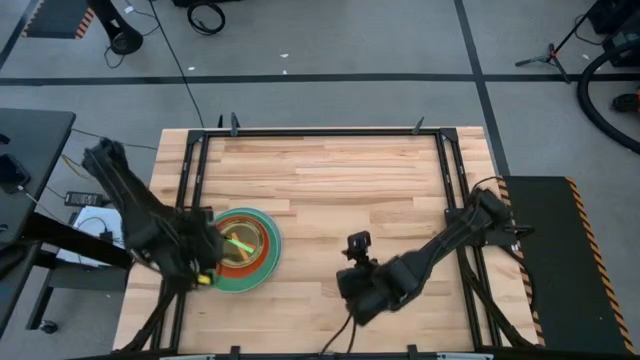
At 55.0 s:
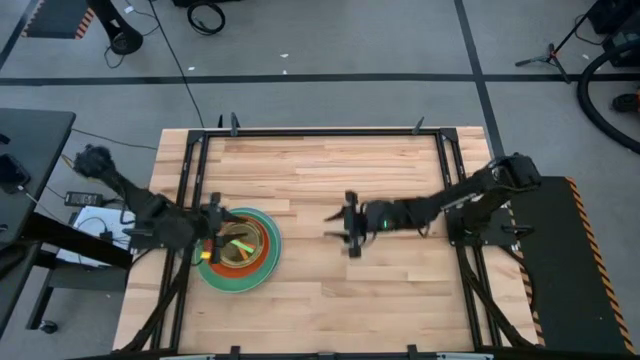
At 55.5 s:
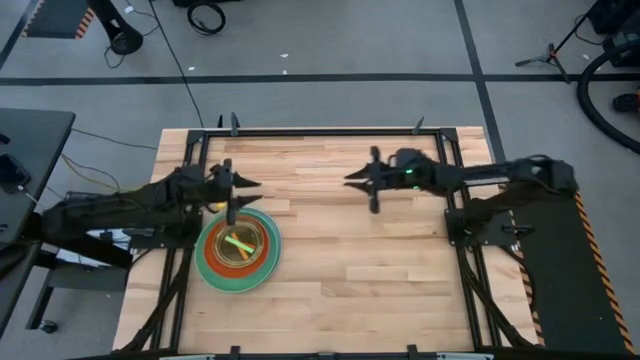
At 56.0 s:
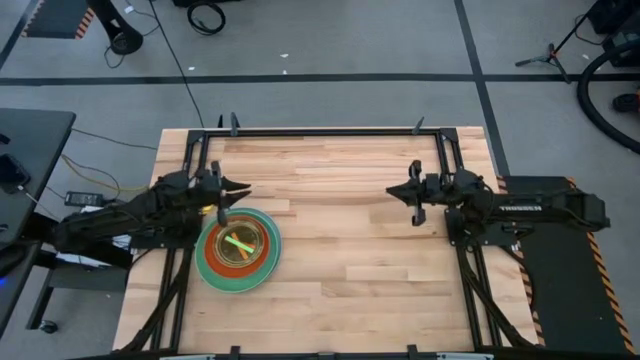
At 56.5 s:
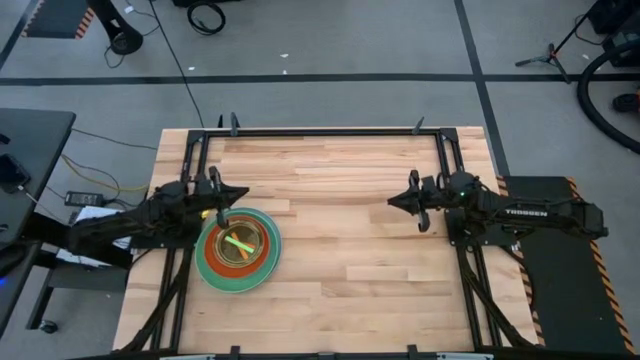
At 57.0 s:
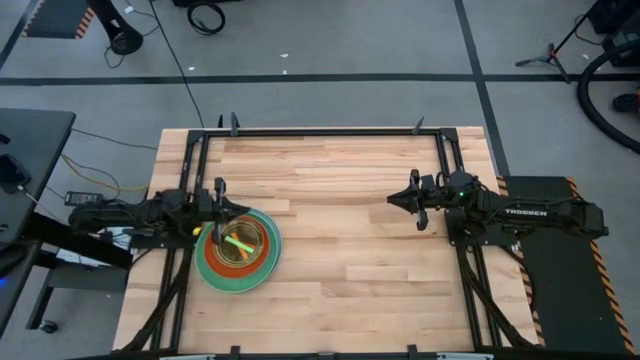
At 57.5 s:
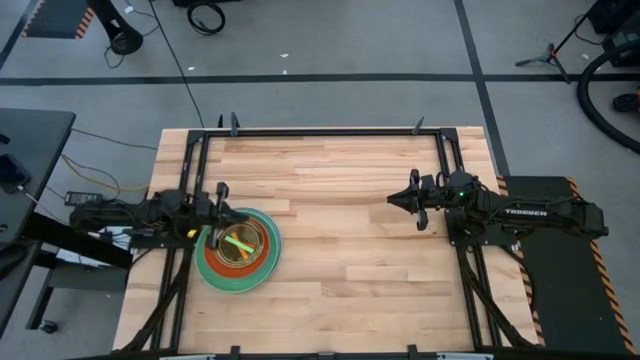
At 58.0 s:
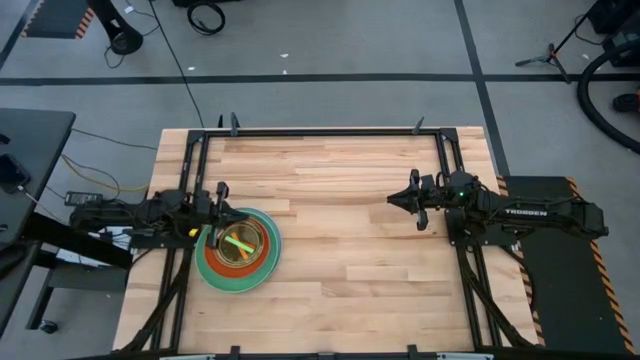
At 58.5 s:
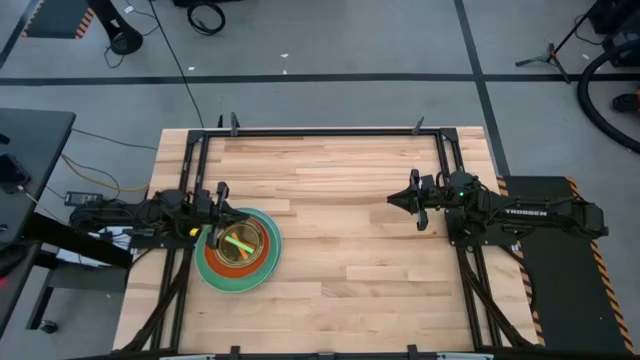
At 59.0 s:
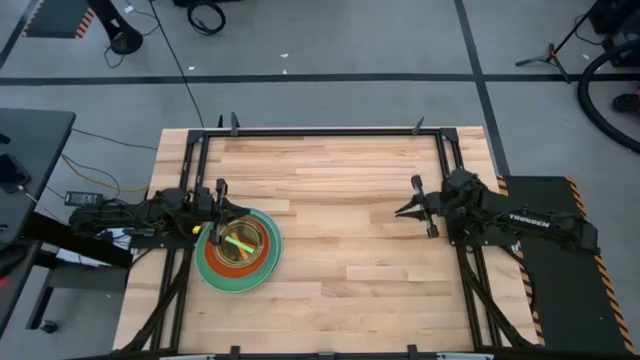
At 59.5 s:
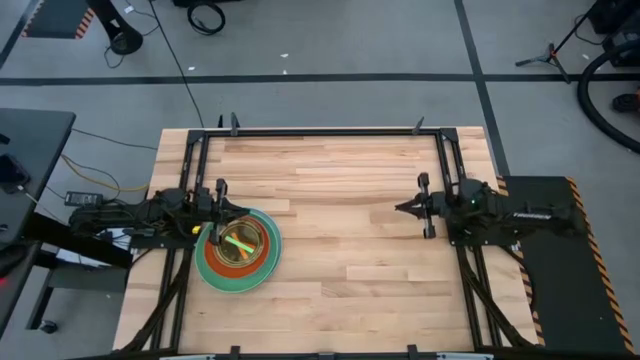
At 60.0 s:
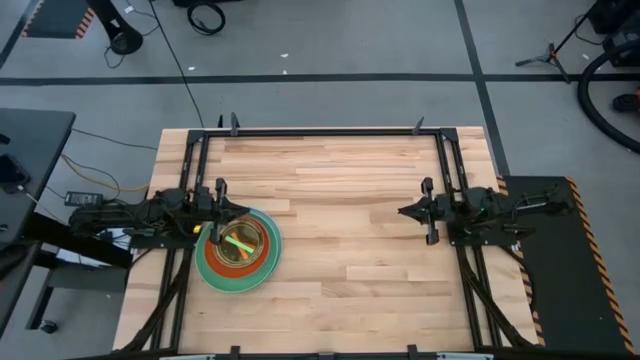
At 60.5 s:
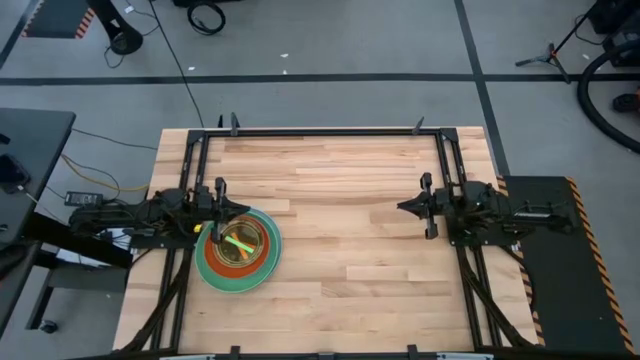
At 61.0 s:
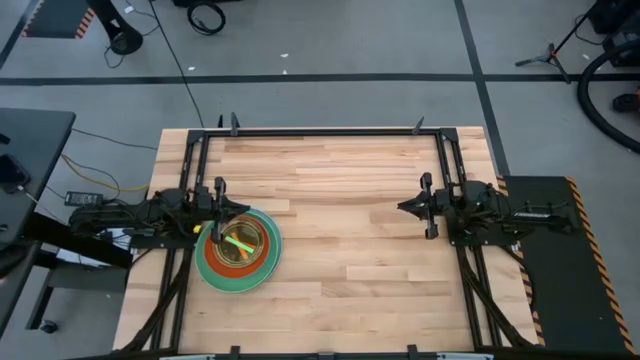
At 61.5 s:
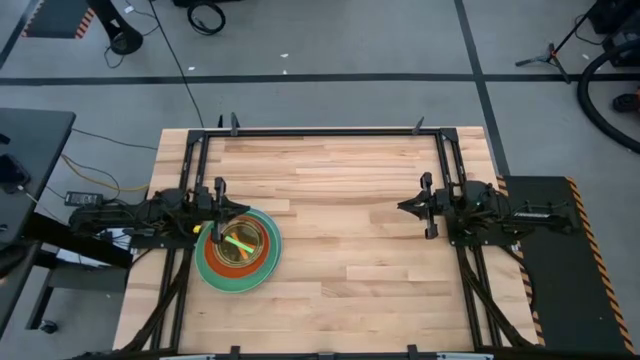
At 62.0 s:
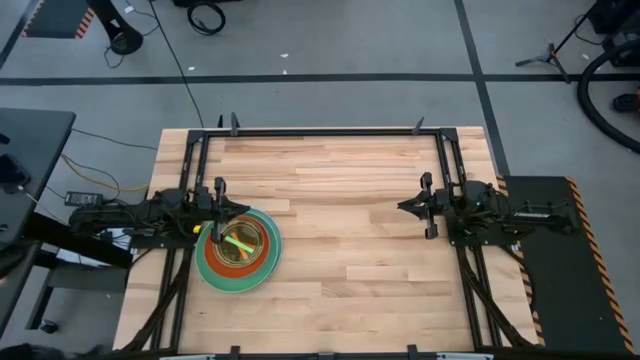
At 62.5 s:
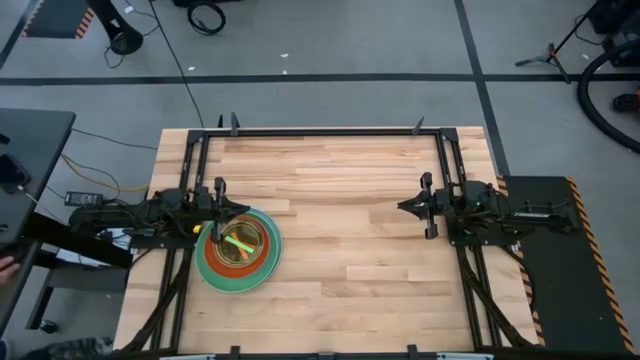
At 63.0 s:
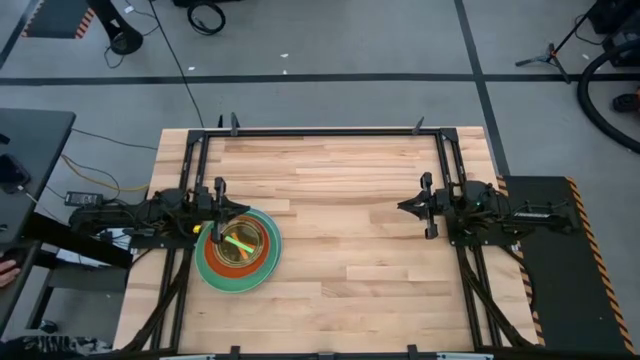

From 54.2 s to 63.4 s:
Task: Stack plastic plates
Return to Home Position

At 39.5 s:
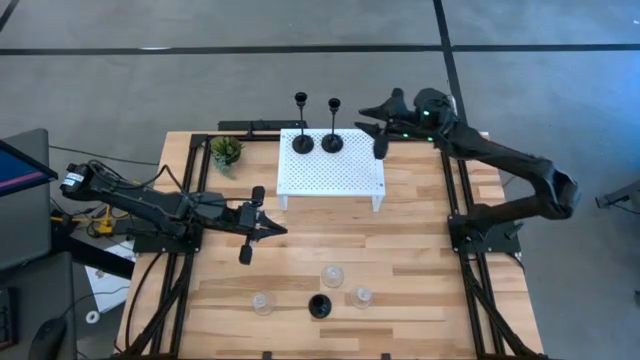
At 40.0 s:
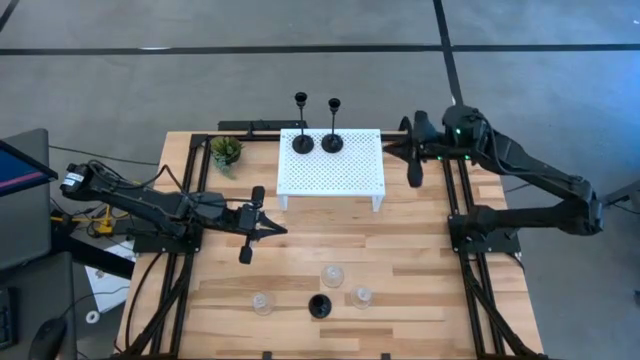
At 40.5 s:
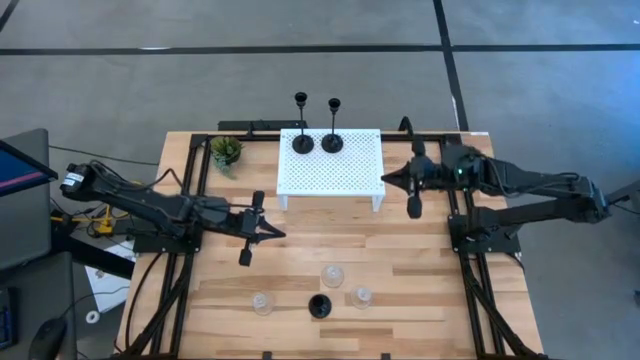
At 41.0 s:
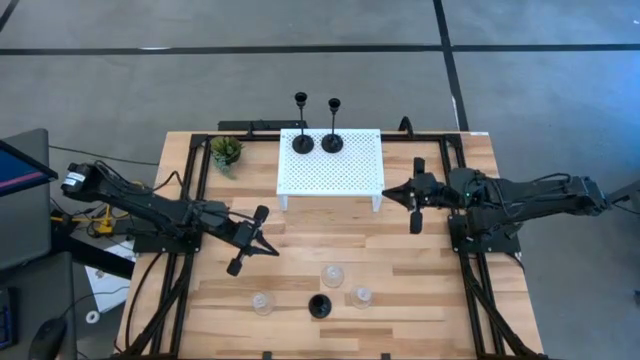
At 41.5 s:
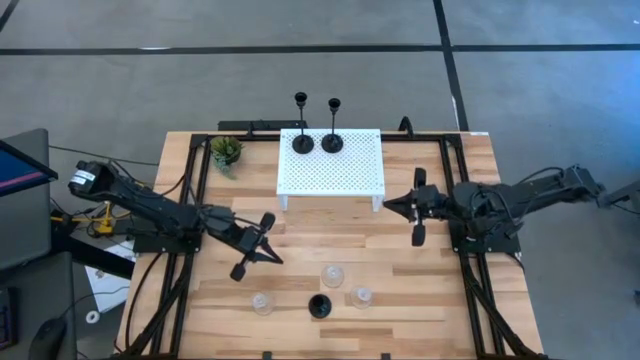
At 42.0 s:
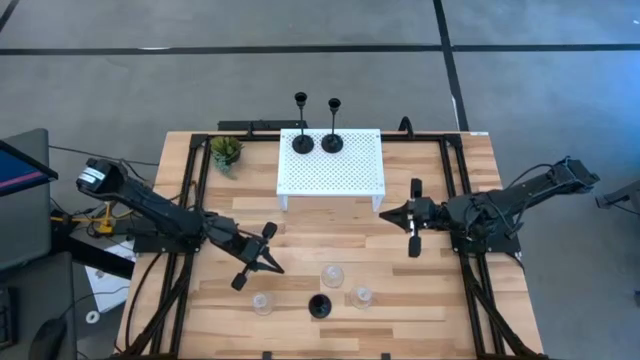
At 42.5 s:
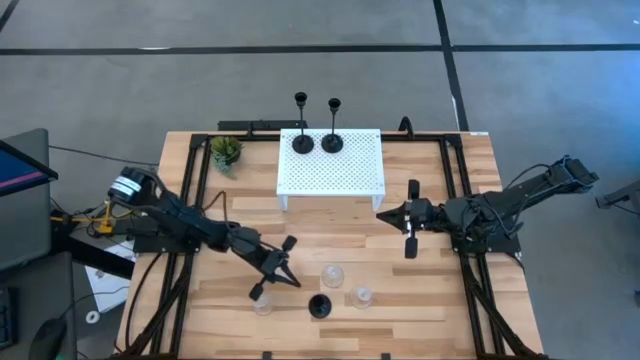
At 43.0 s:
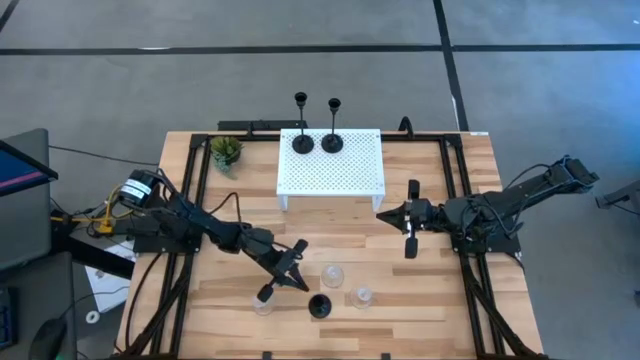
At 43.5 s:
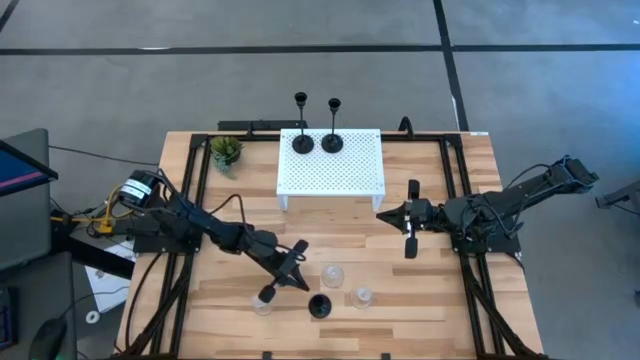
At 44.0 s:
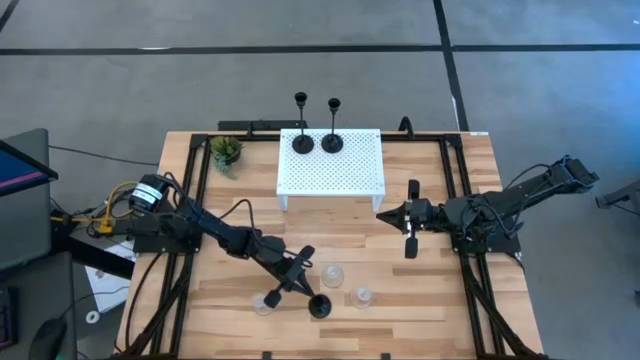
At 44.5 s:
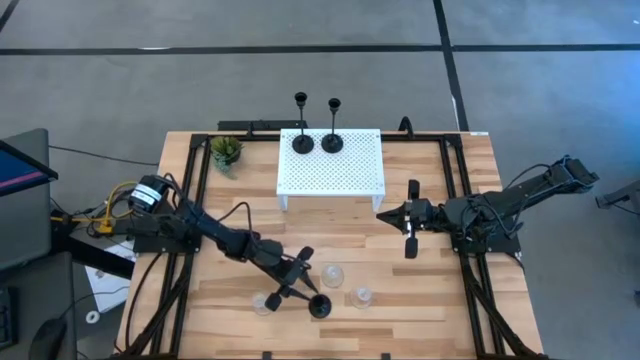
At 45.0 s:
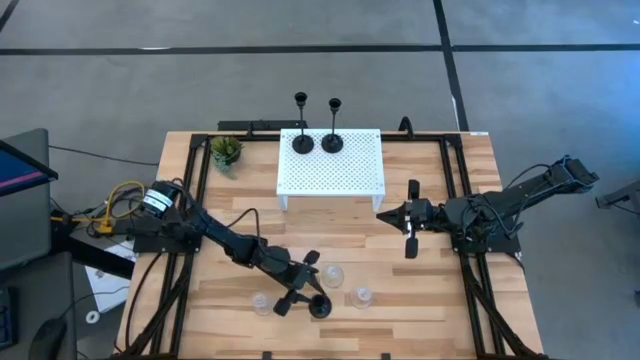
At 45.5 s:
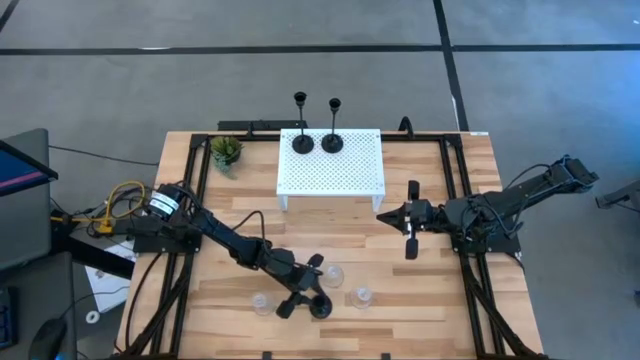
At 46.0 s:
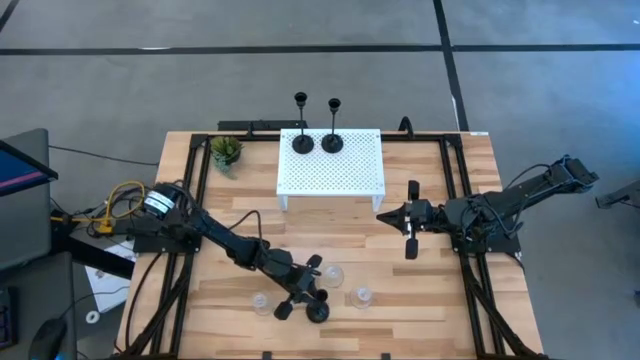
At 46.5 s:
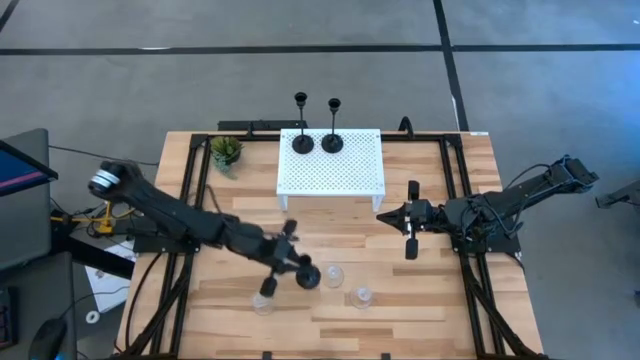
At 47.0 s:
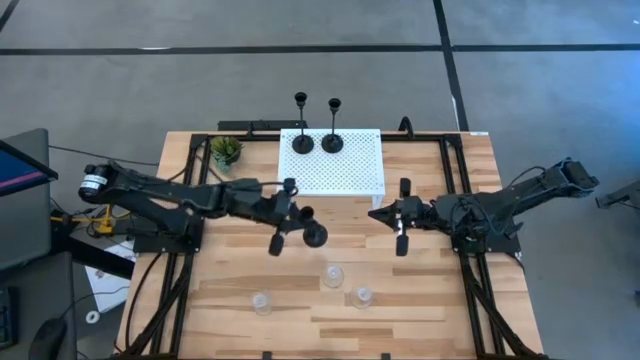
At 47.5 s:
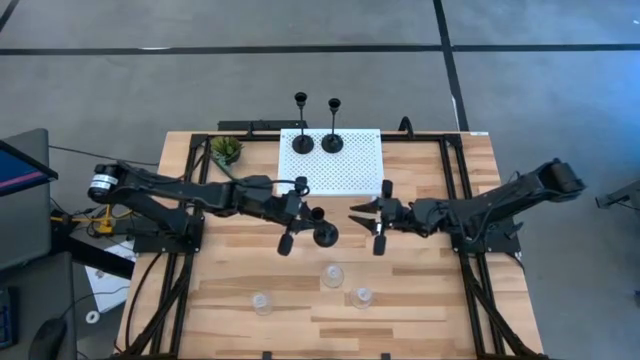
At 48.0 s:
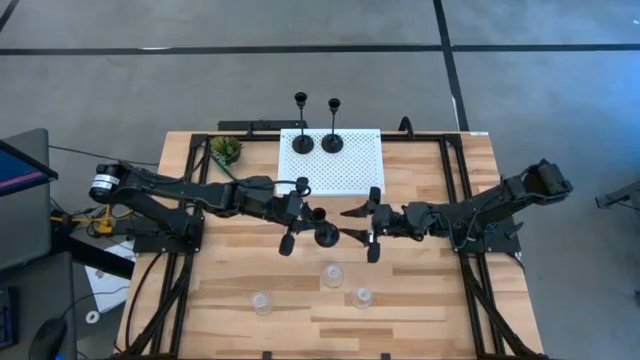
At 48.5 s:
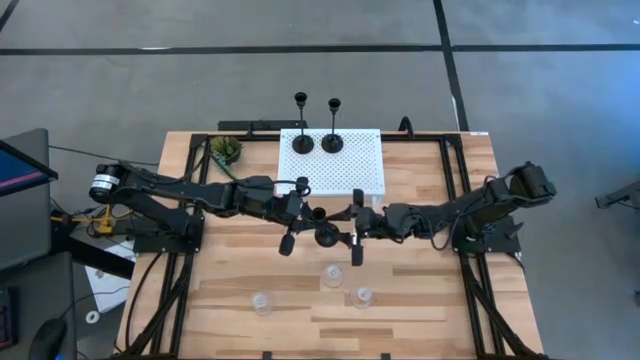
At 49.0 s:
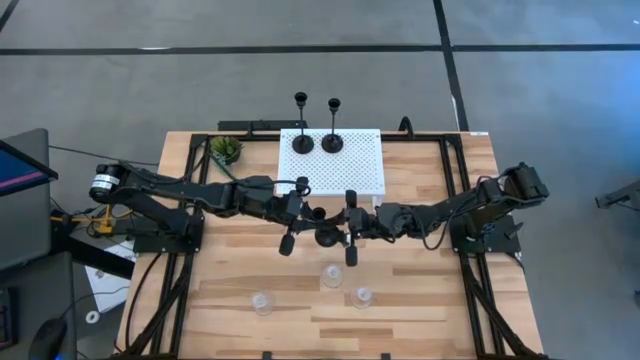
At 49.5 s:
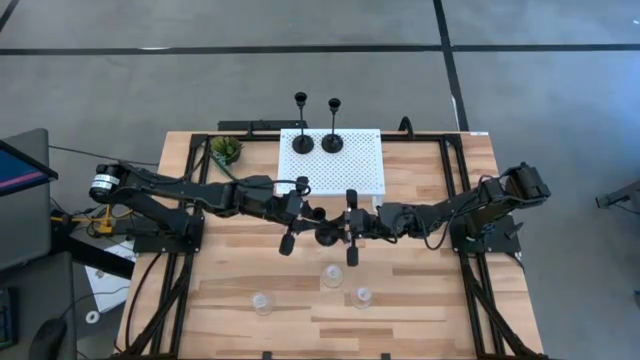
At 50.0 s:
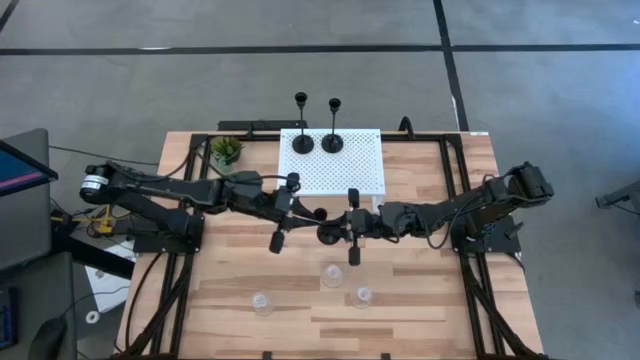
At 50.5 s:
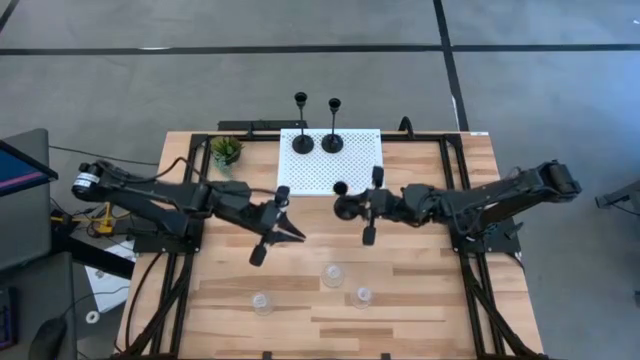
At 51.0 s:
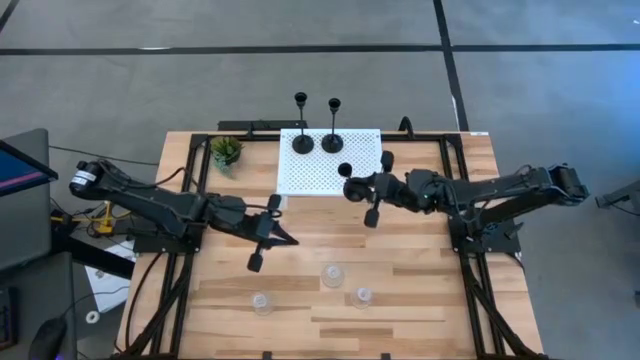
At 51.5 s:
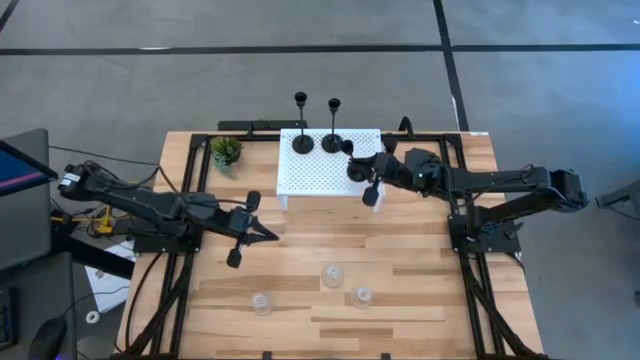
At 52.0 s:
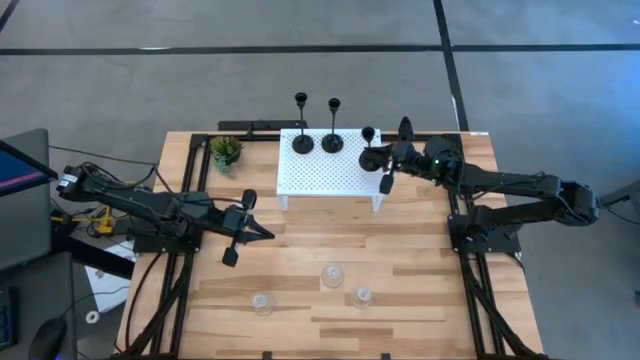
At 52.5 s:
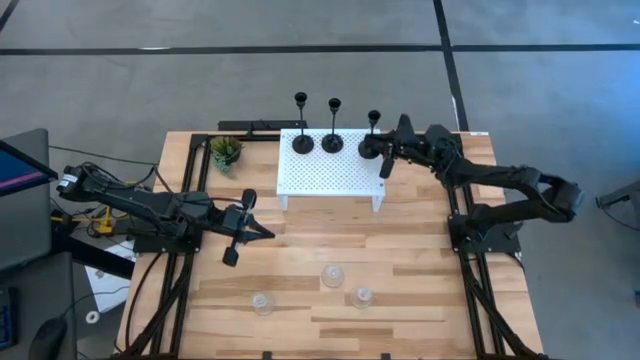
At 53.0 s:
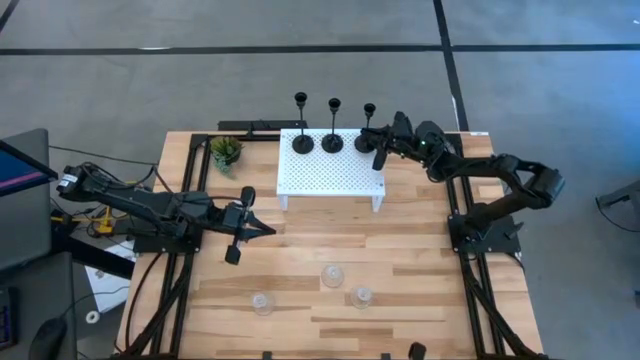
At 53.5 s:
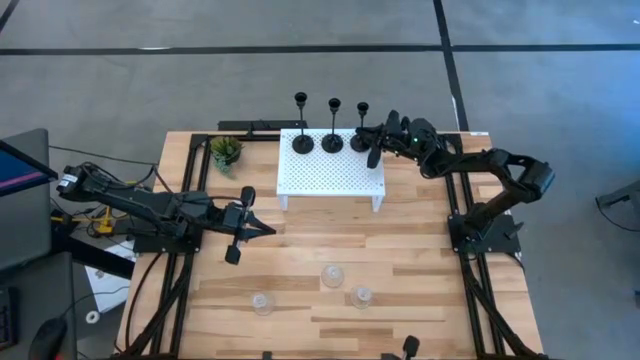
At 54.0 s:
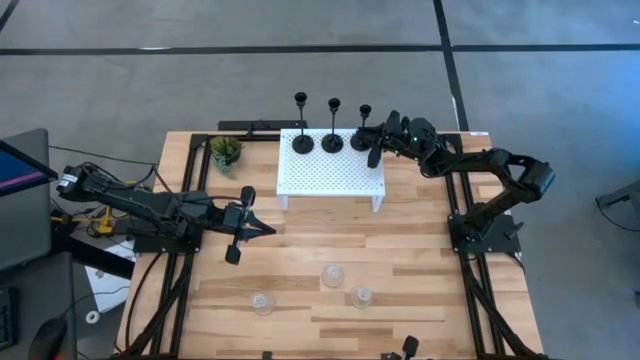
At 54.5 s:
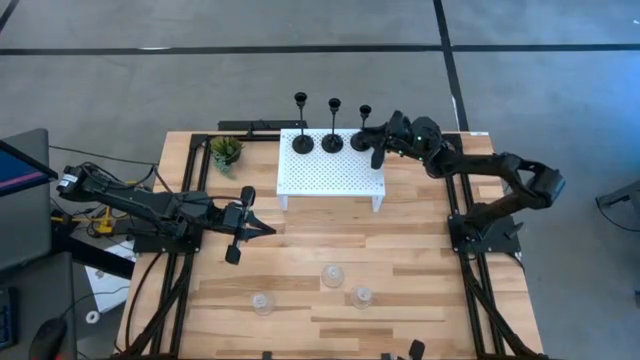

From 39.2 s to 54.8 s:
Task: Pick & Place candle stick holders
Put the black candle holder on the shelf
